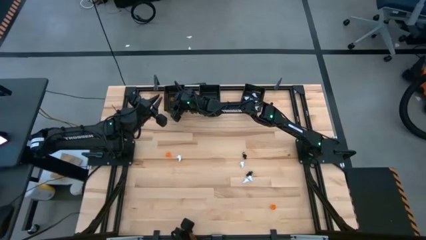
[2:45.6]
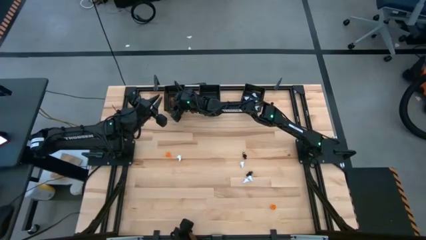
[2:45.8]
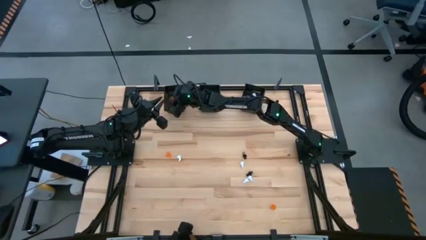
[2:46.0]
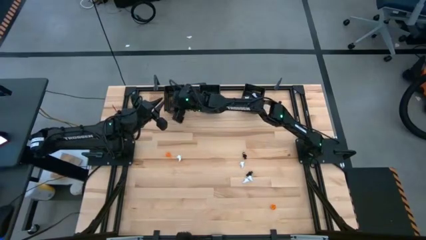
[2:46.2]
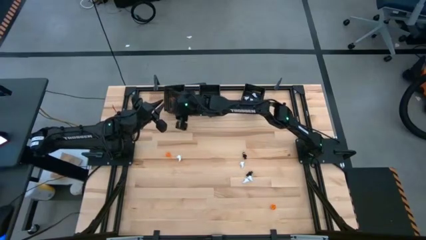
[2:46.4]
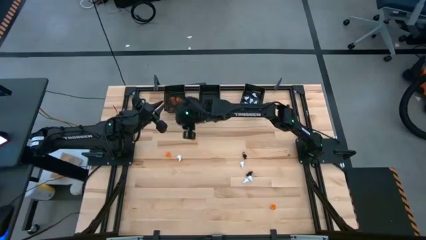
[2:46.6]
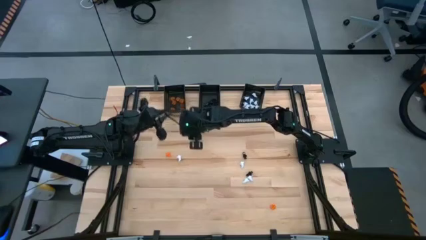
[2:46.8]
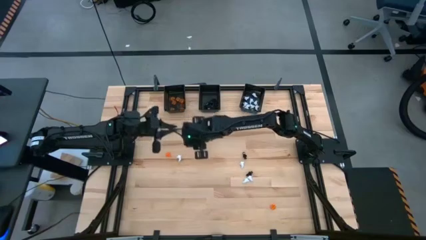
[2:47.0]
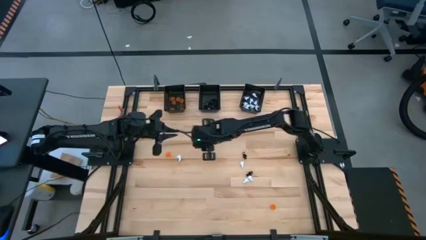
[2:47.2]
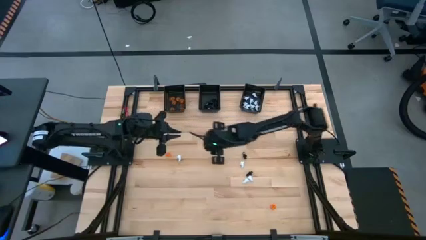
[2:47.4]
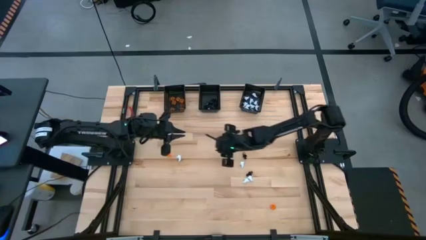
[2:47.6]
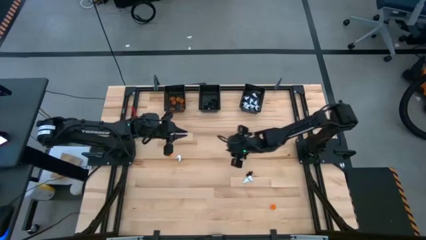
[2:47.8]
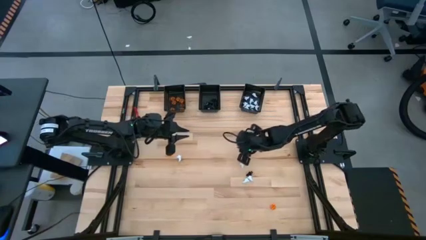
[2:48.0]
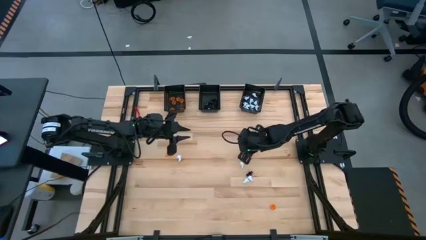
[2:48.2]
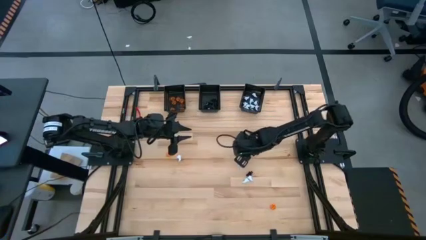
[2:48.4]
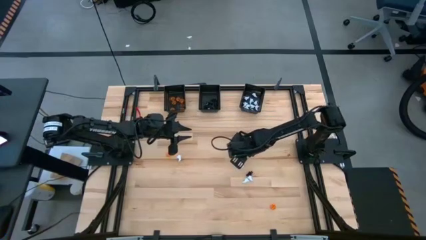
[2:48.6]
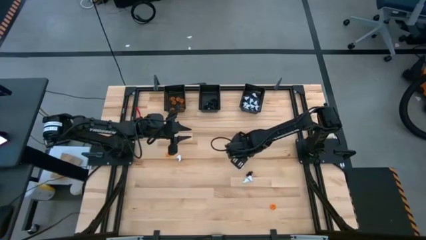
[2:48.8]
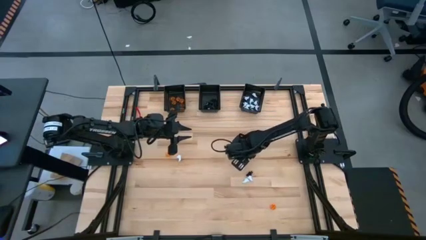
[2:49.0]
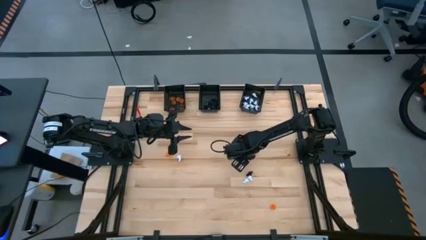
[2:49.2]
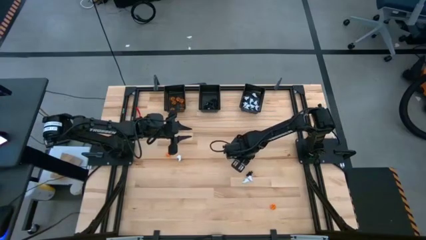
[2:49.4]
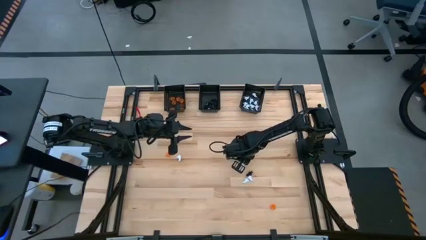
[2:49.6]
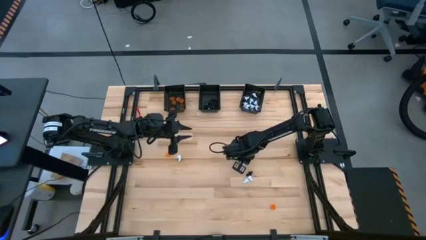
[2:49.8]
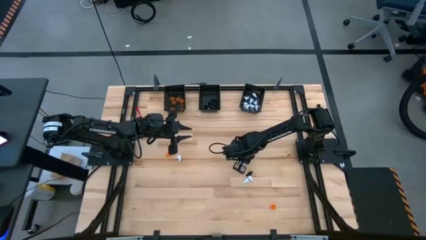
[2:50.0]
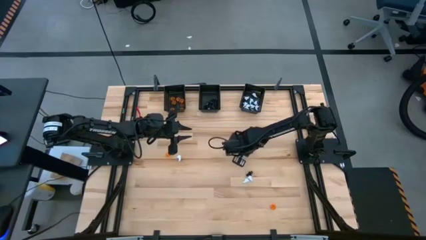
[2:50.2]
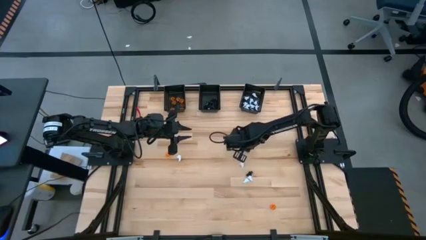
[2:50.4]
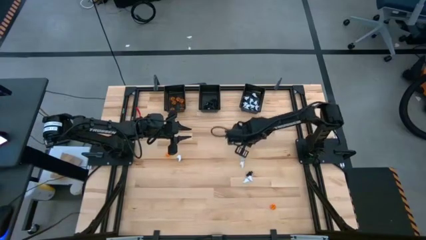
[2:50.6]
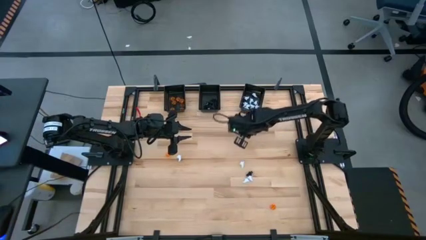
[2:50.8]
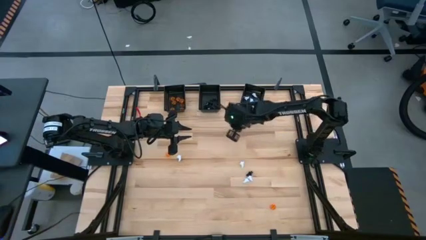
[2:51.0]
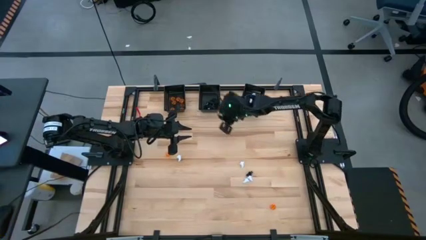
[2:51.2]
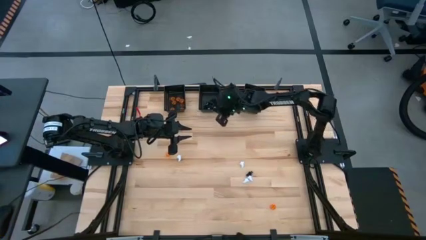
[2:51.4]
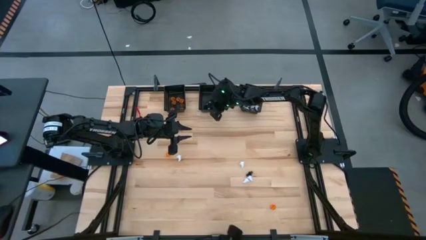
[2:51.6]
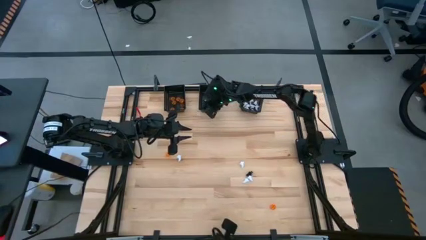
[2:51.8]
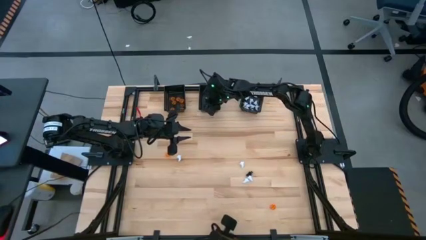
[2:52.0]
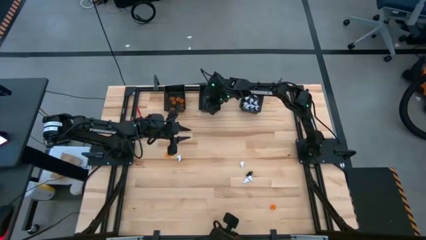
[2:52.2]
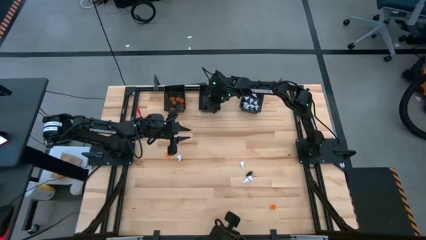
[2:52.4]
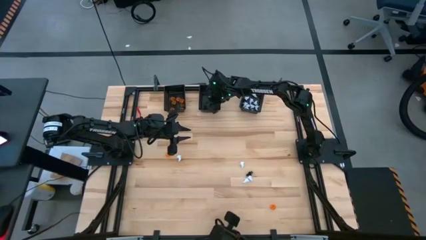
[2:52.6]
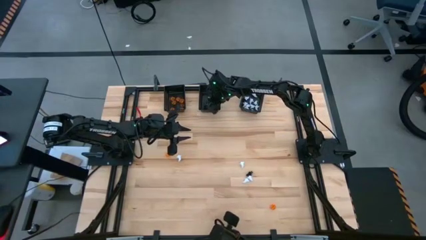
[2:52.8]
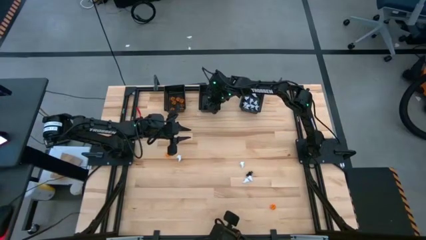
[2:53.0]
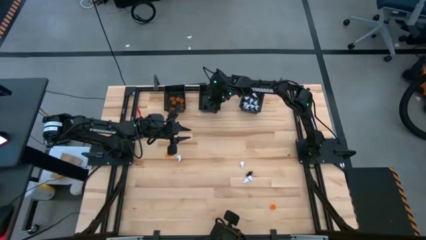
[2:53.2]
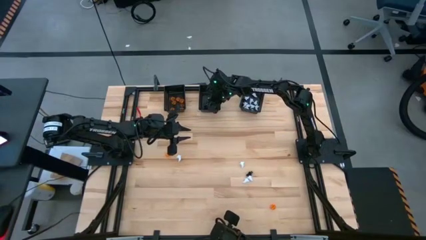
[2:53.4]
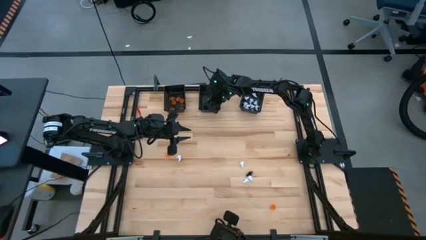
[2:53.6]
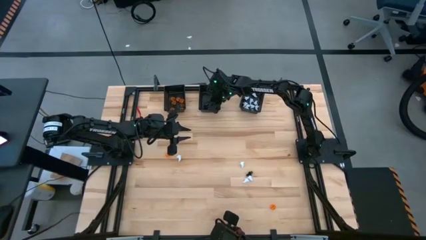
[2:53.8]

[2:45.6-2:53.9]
Task: Sort Halloween decoration
Put the black skeleton toy into the black middle basket

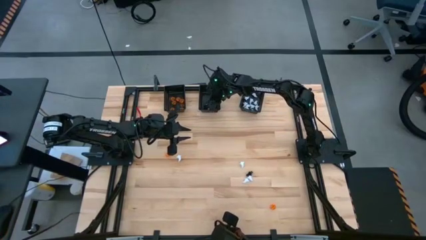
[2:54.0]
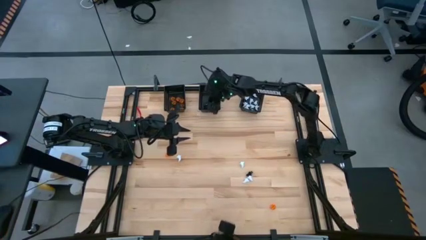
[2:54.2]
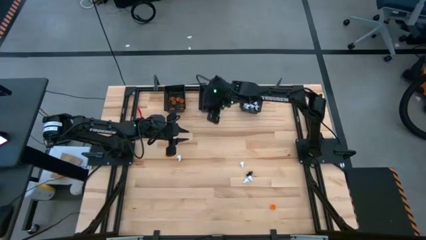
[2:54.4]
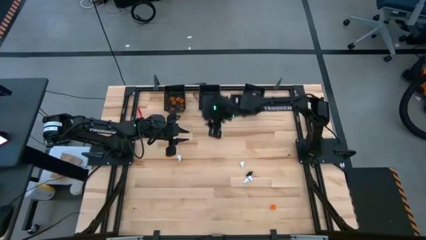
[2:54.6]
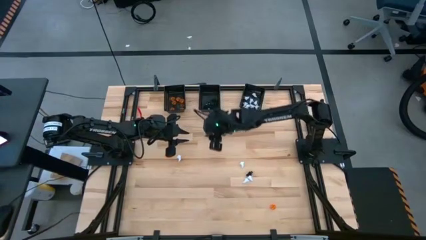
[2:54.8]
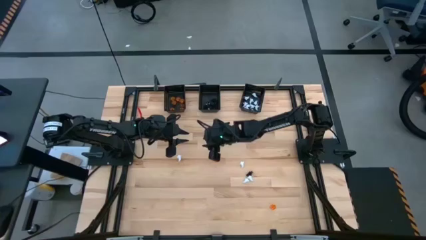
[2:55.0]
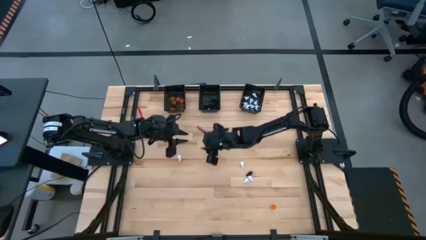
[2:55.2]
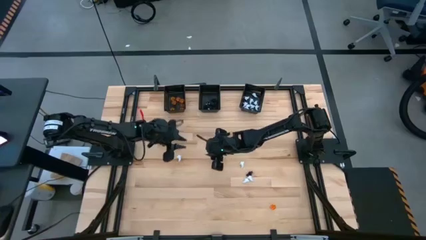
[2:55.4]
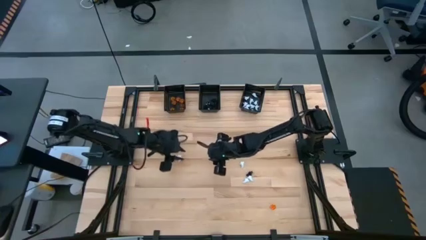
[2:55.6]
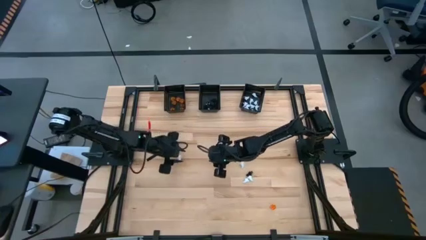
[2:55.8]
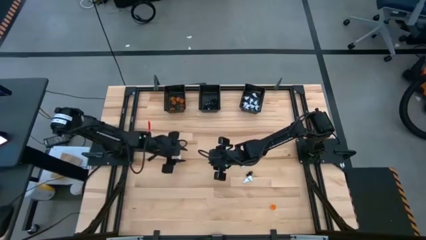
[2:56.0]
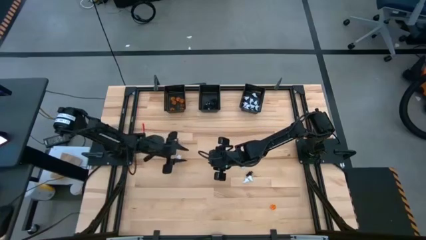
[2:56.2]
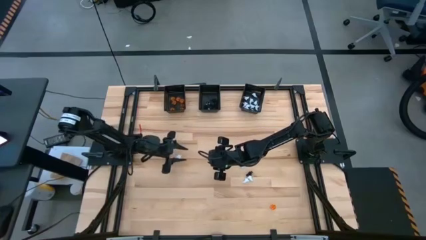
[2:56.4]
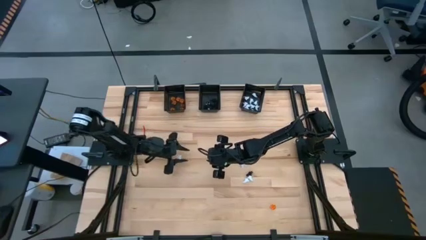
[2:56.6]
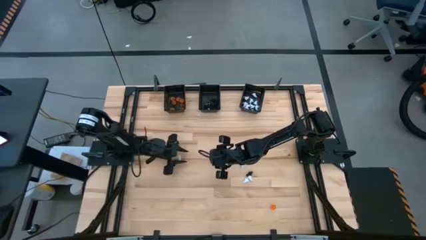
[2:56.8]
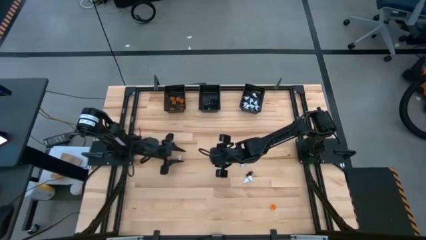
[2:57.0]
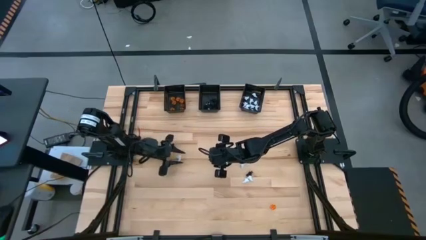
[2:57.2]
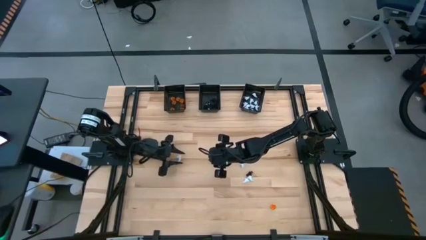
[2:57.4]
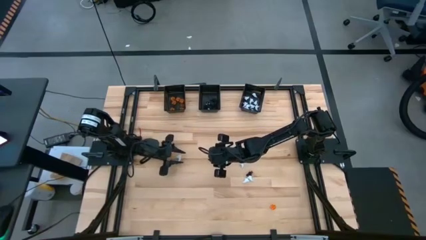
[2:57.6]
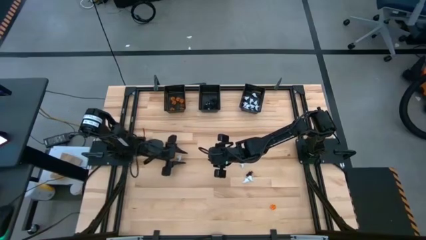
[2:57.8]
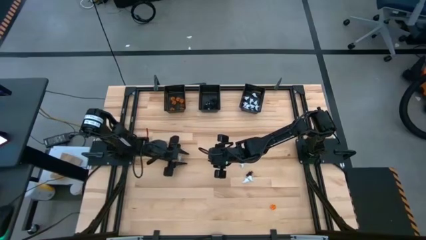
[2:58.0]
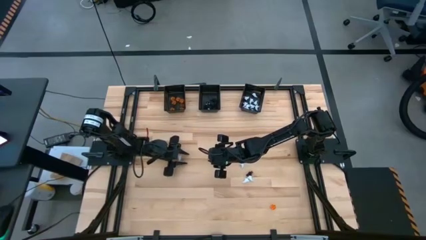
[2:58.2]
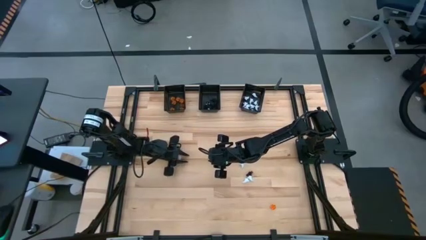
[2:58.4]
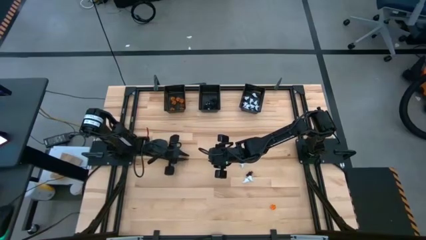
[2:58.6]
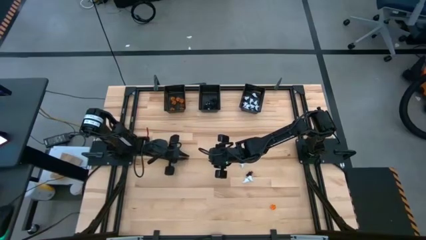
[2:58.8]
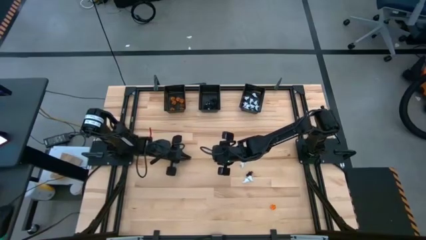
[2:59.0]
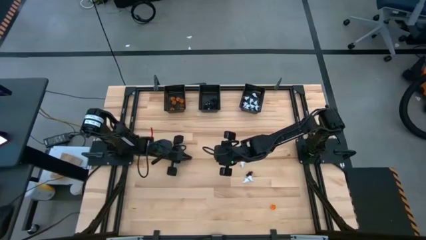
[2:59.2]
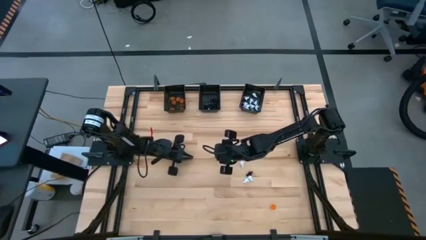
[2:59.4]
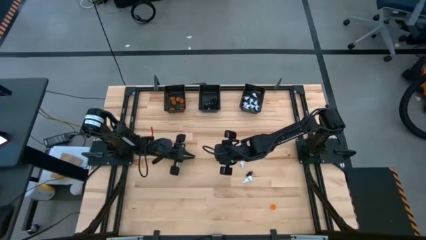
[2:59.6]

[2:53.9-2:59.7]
Put the white ghost toy into the right black basket

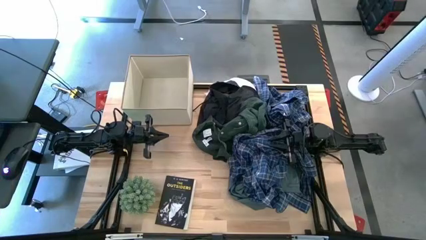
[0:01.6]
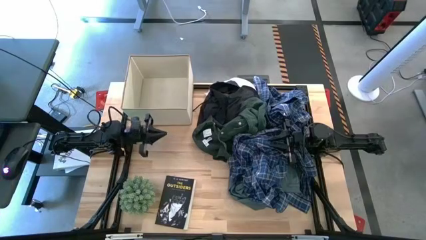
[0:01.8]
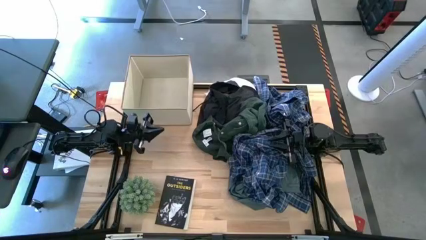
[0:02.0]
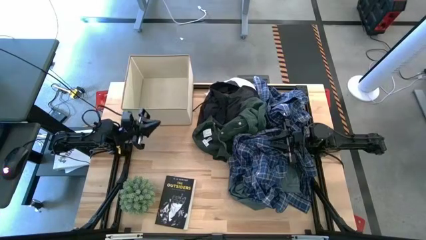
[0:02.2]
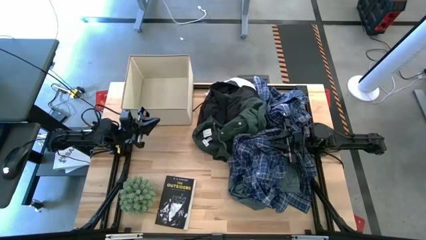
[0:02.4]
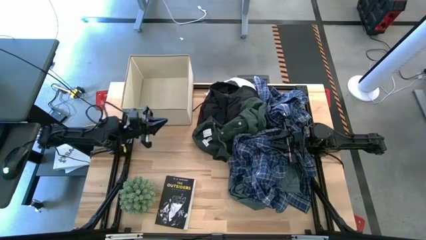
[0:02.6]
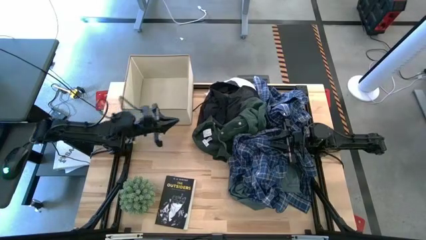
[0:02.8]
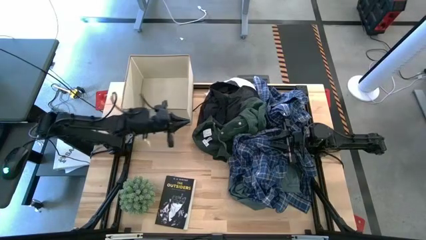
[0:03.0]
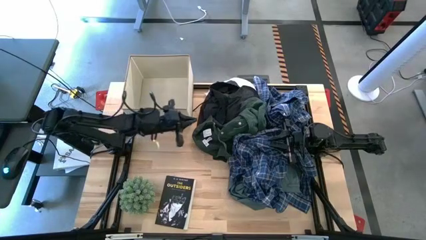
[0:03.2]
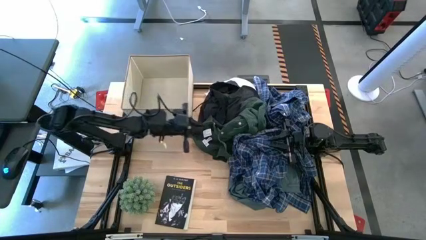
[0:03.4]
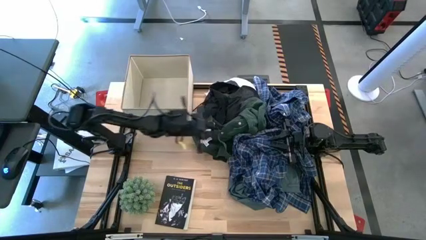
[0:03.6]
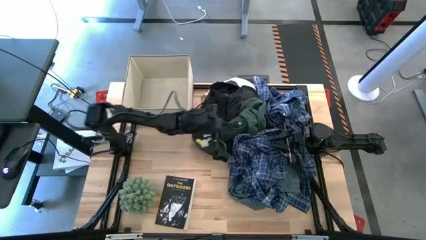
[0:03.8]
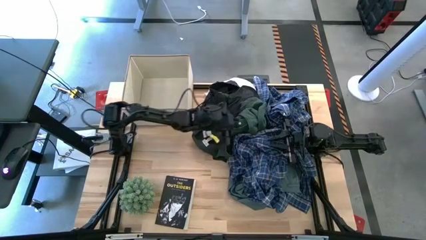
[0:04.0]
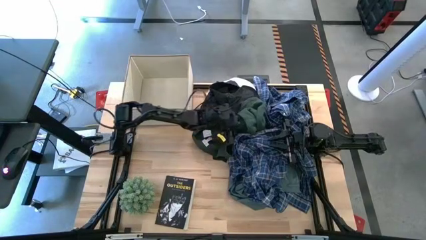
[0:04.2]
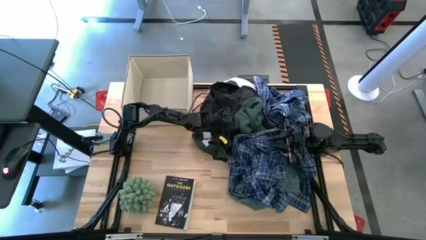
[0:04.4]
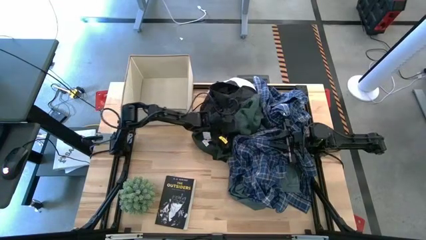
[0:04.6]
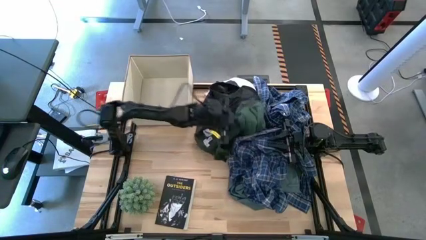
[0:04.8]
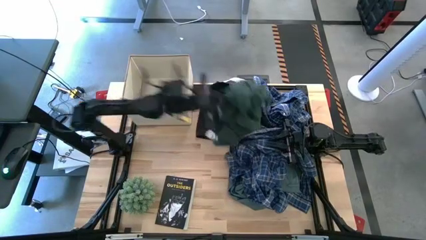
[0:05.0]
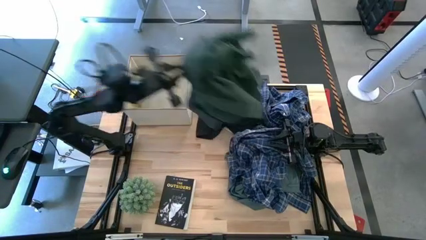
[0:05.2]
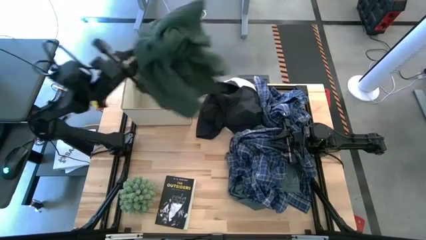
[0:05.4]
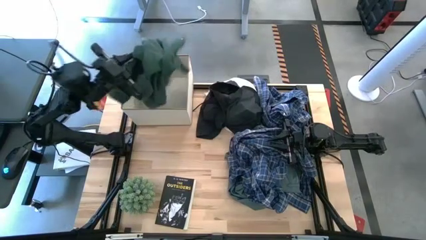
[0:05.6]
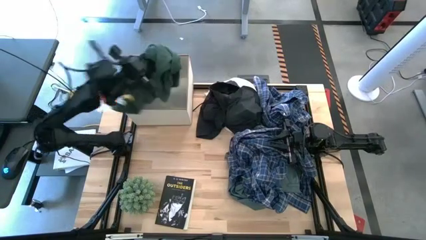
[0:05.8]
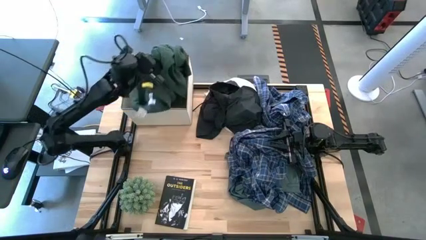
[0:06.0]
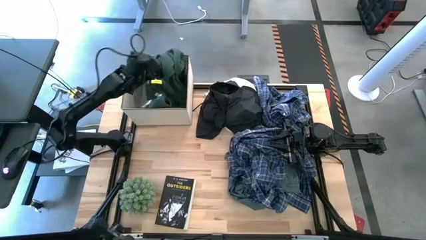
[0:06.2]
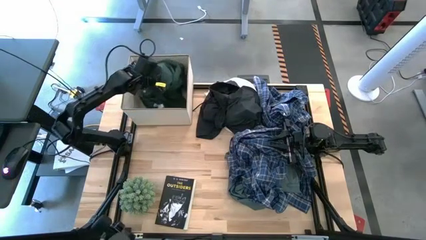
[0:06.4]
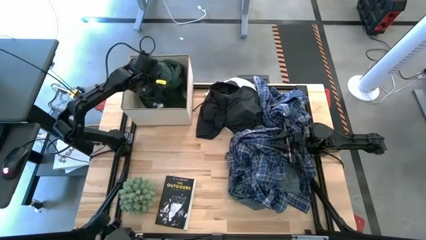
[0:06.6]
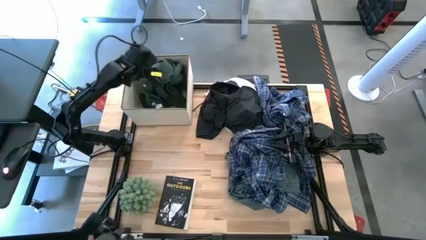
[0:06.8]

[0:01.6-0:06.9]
Task: Sort clothes
Put the green shirt into the laundry organizer
